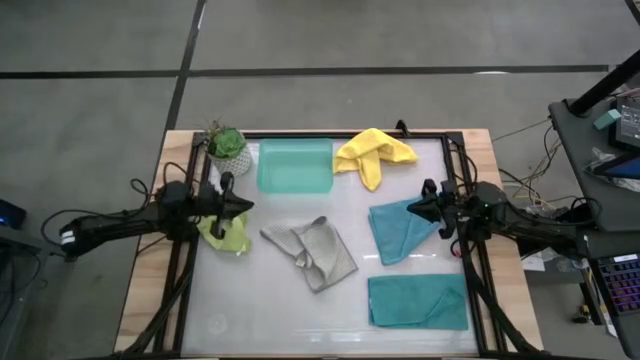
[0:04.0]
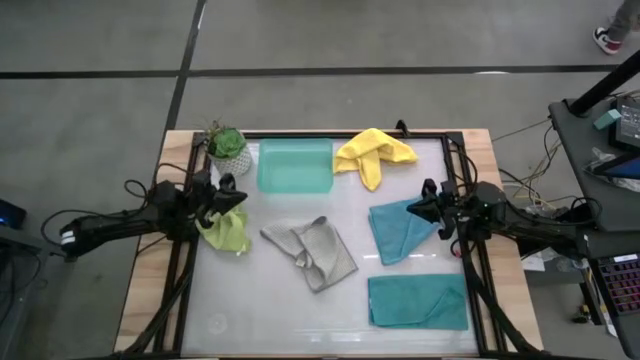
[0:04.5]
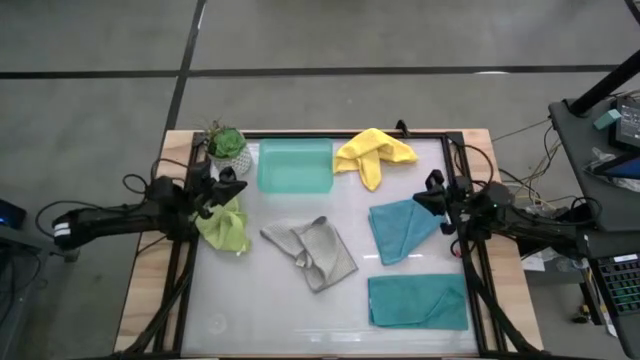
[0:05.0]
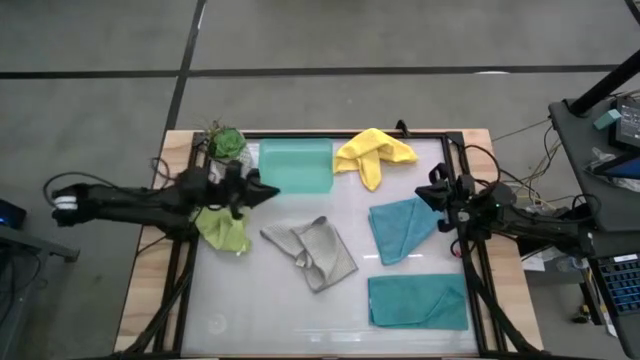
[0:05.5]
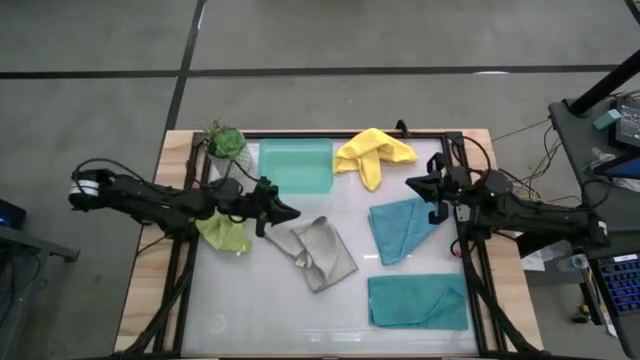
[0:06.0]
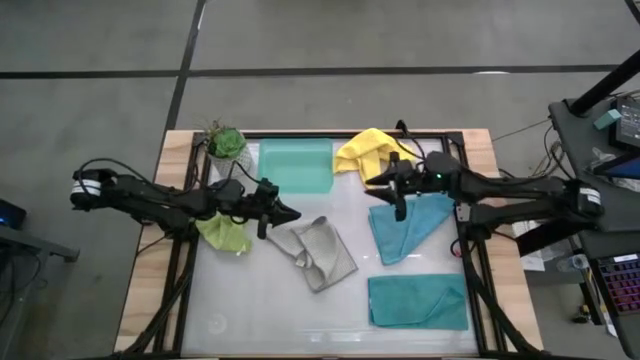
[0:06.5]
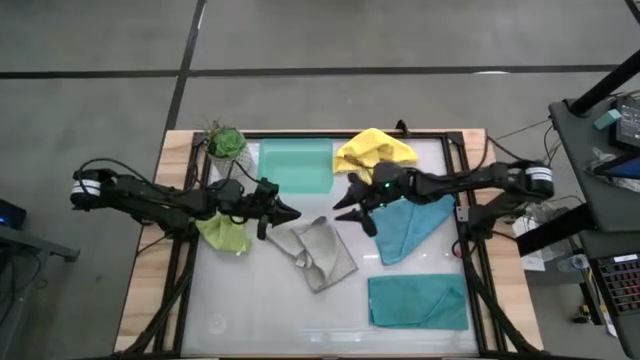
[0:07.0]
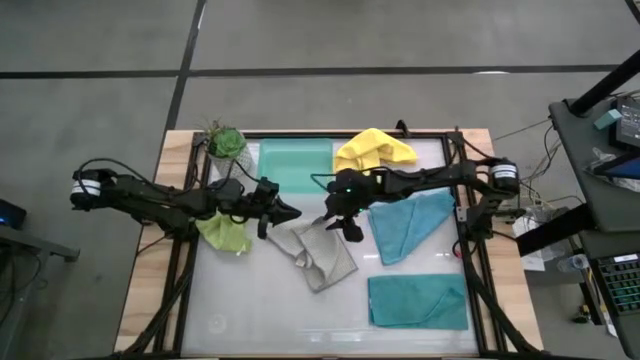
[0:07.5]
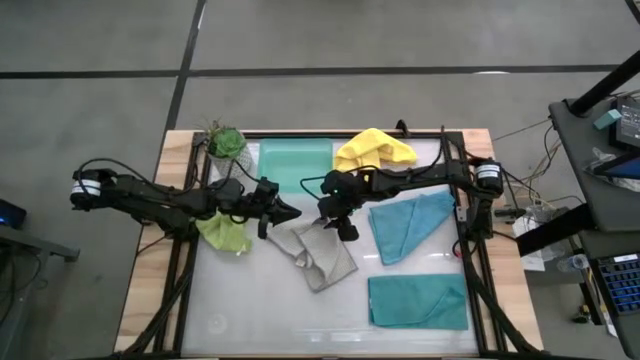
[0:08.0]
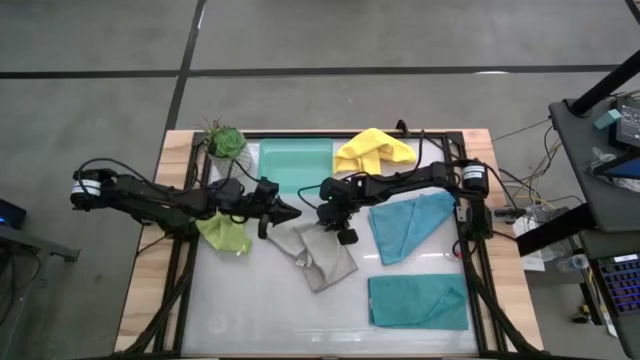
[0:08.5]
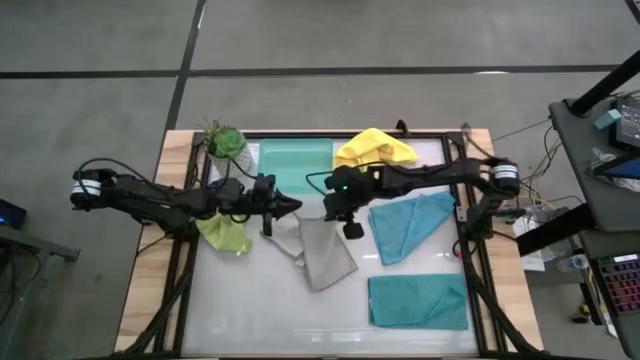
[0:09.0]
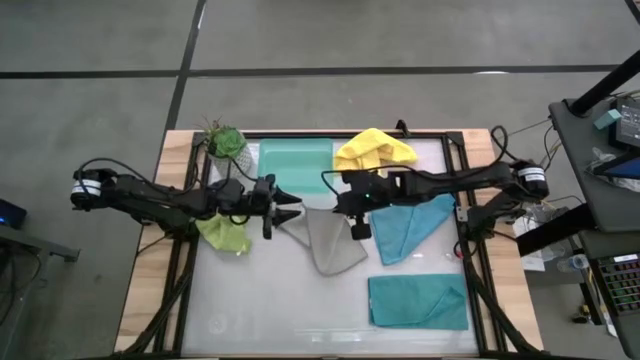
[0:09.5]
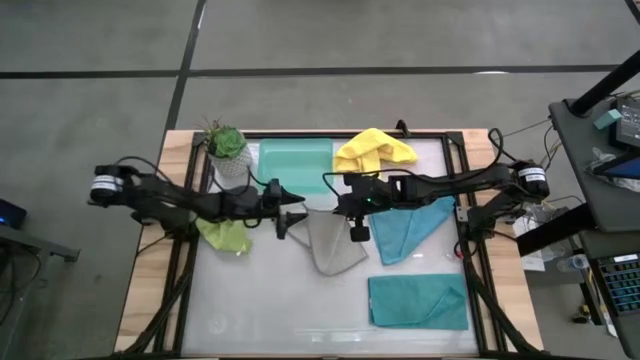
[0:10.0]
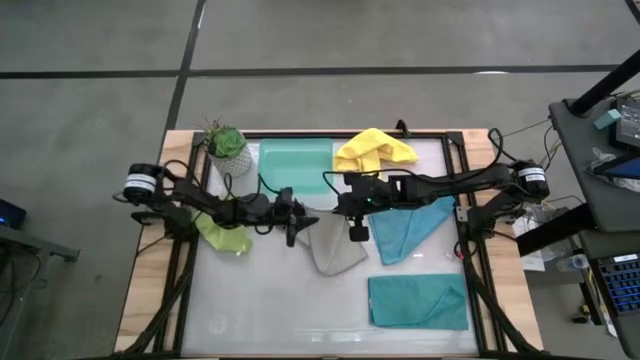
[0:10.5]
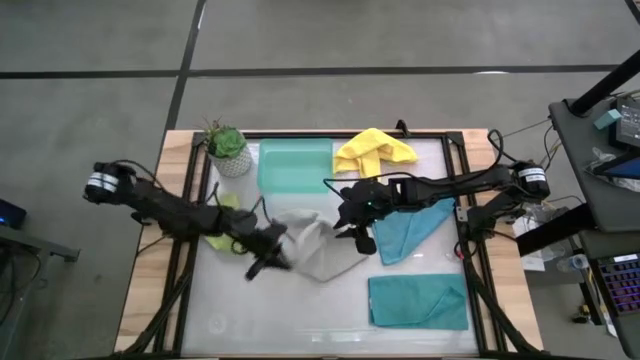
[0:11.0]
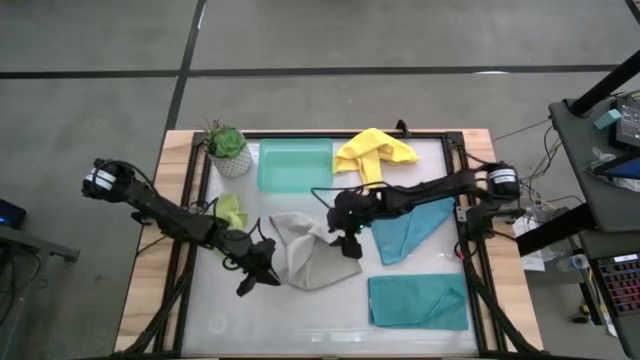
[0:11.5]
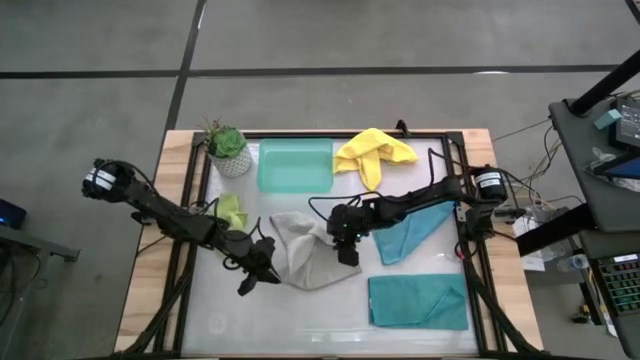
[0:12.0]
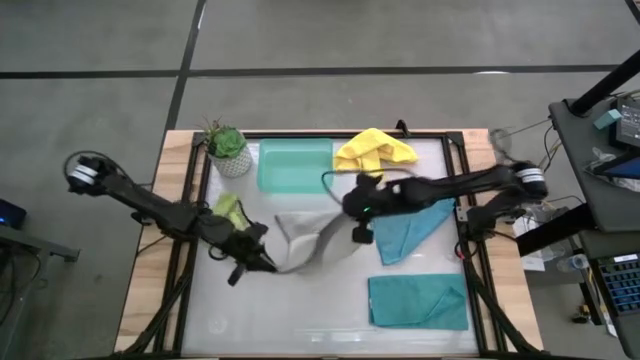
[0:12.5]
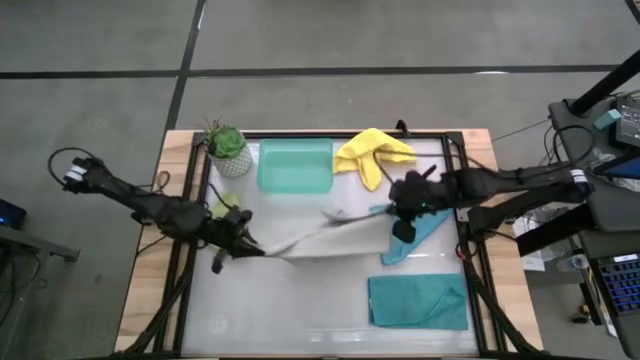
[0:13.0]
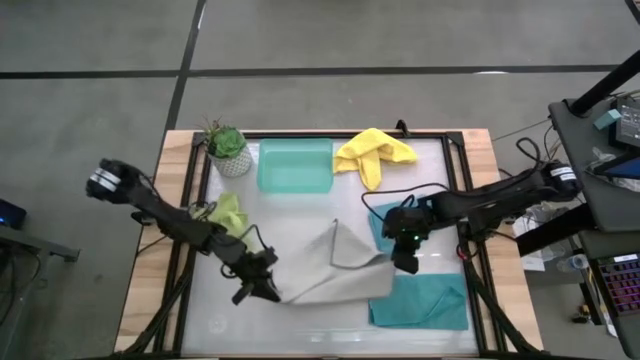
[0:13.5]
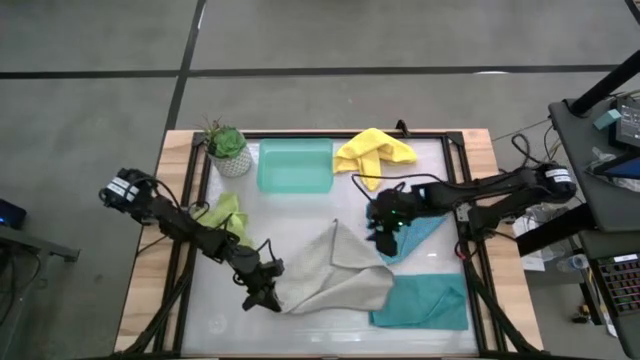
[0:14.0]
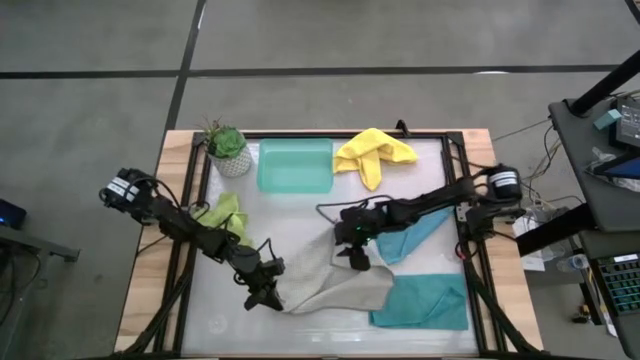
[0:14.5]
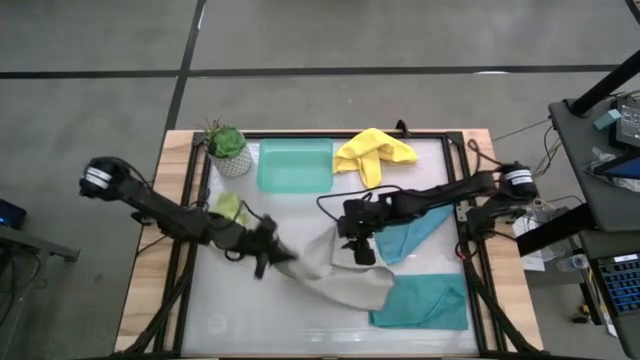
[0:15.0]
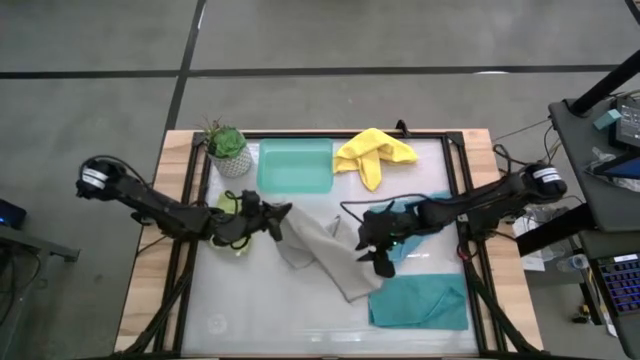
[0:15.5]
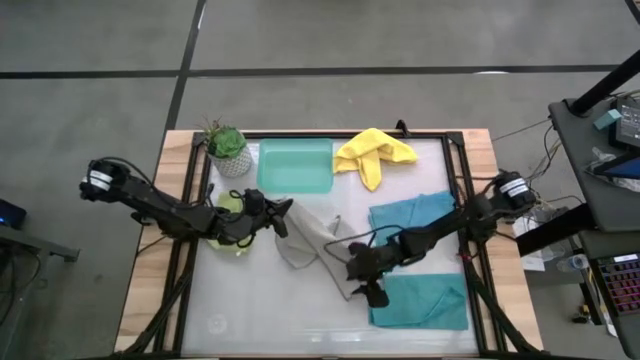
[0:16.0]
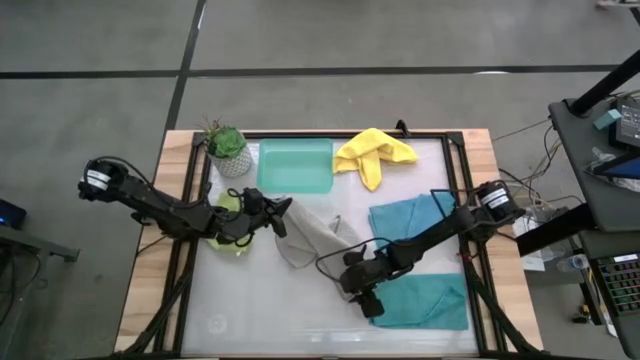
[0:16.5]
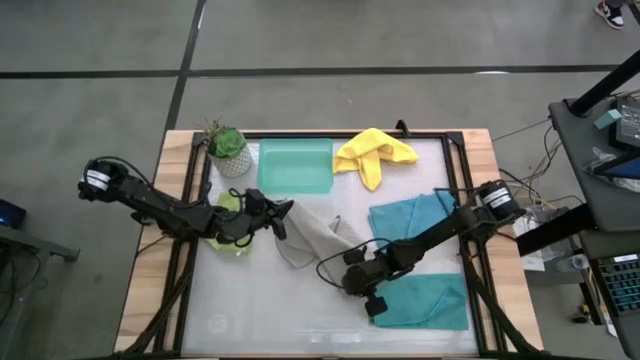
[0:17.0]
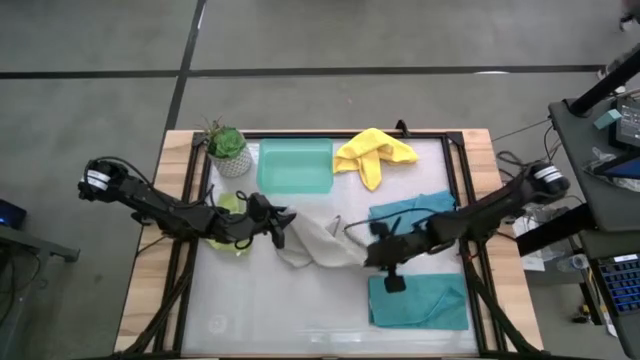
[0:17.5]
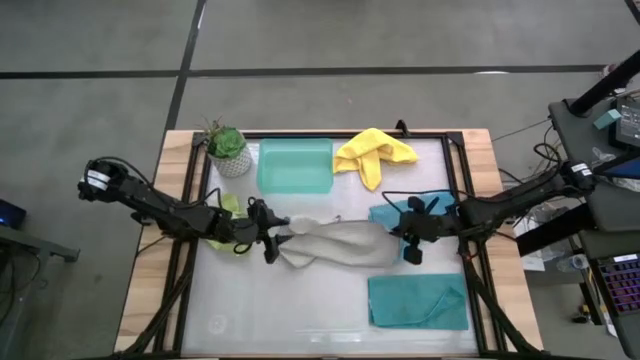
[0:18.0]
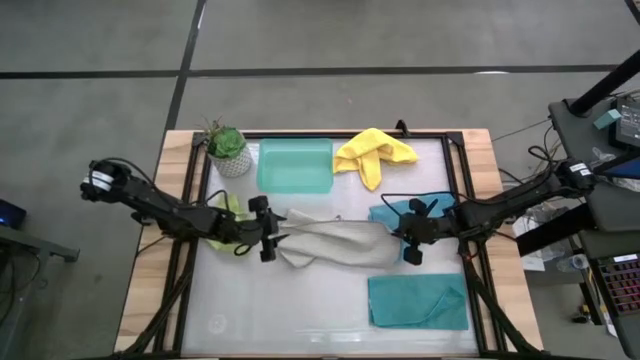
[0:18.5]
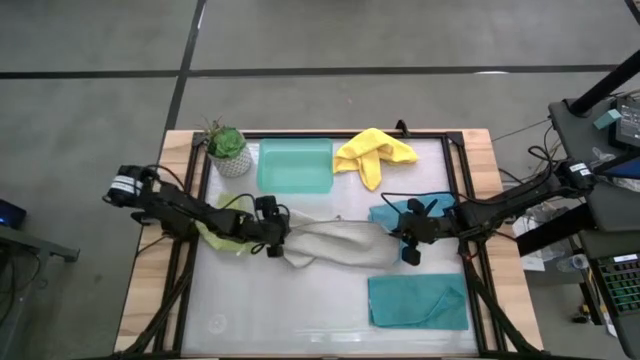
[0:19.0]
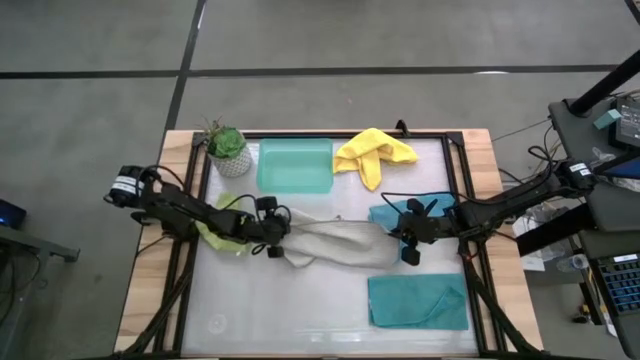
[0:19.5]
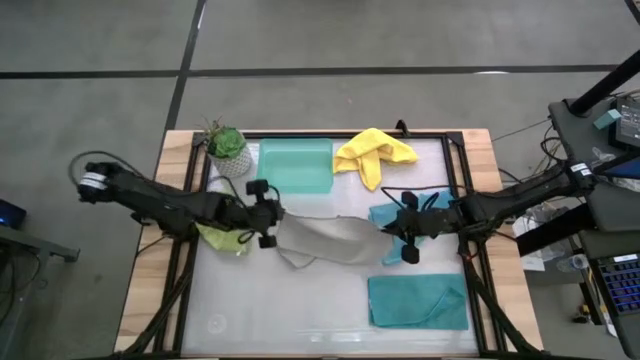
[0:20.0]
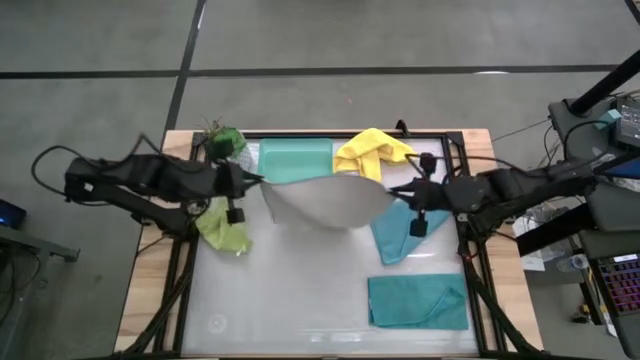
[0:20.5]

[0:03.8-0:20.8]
Task: Fold microfiber towels
Fold the gray microfiber towel
